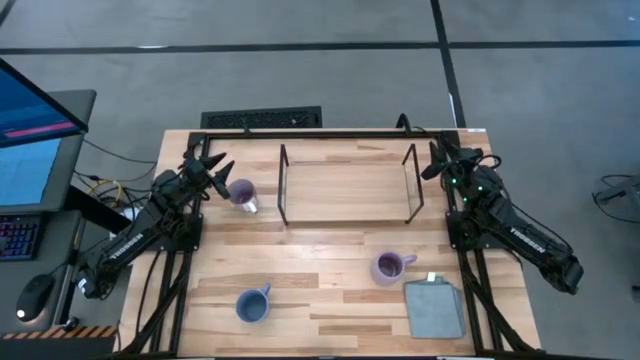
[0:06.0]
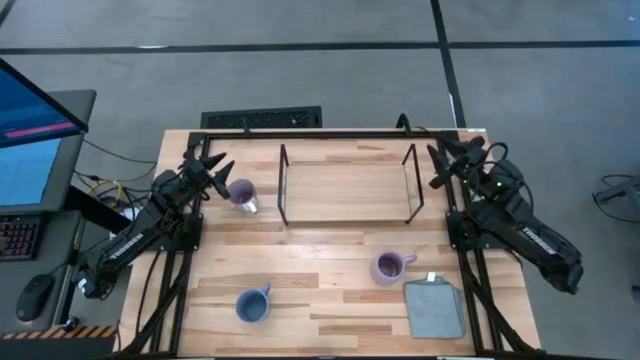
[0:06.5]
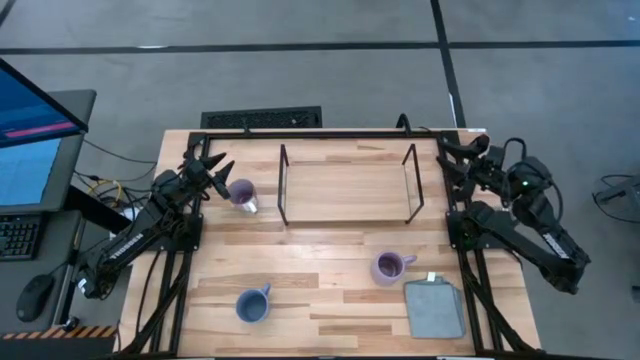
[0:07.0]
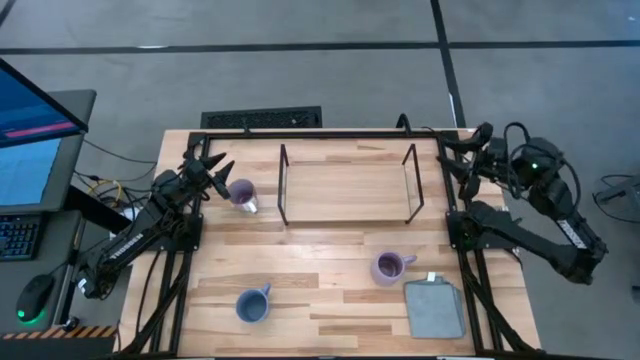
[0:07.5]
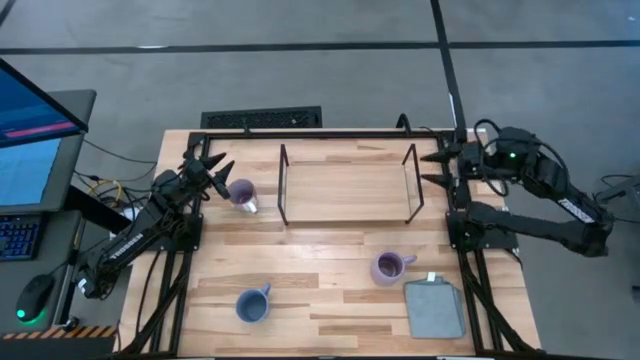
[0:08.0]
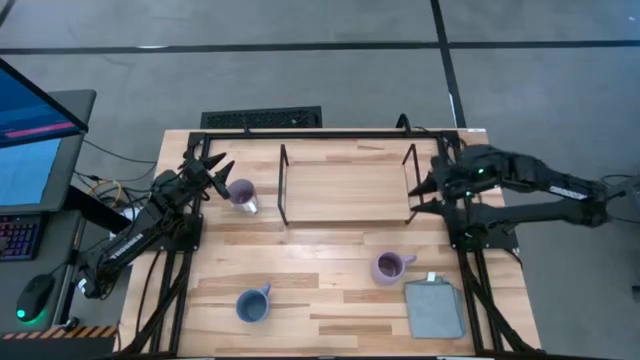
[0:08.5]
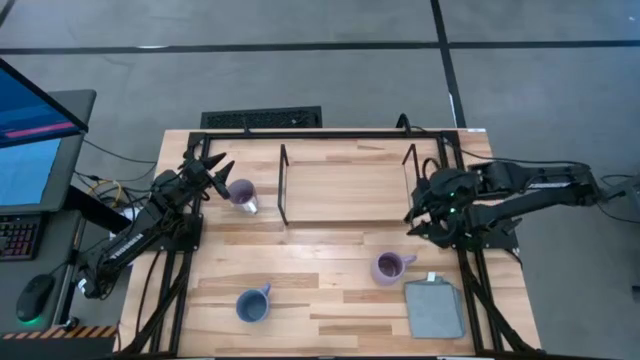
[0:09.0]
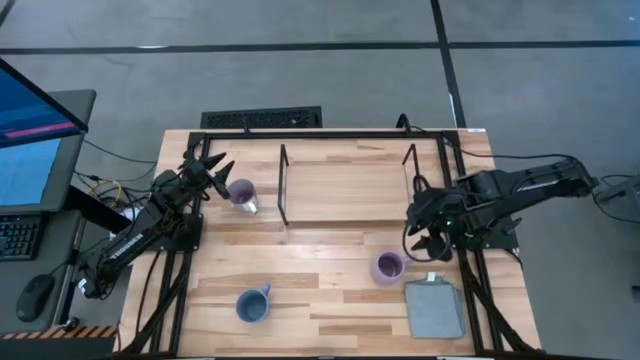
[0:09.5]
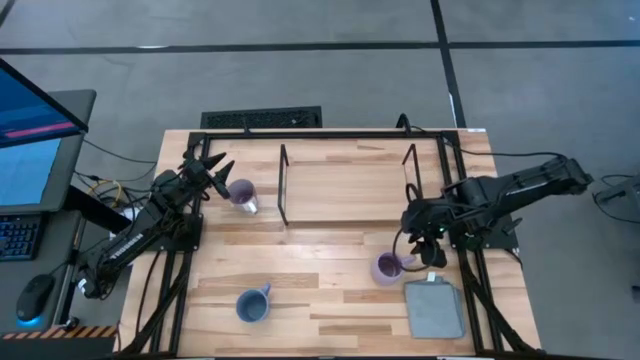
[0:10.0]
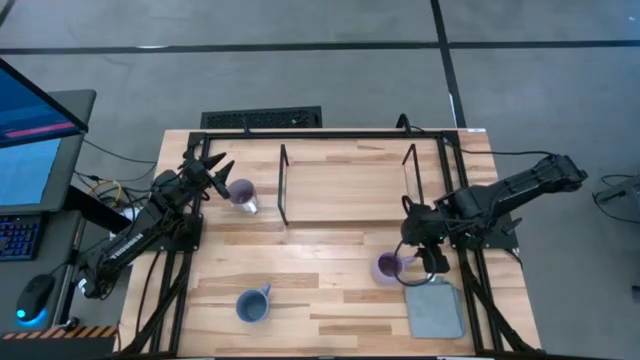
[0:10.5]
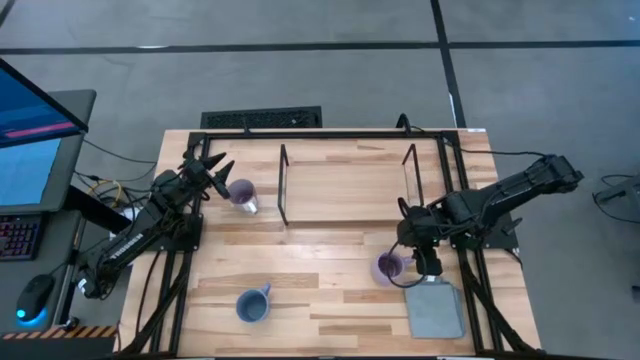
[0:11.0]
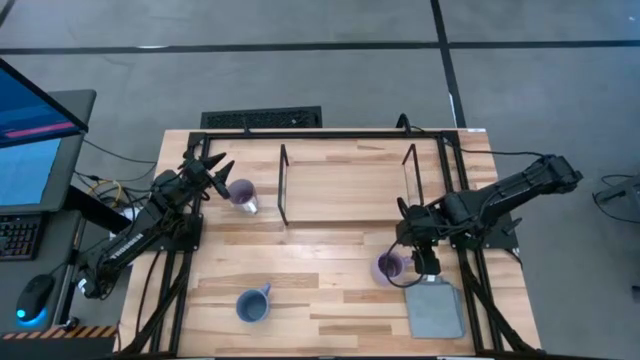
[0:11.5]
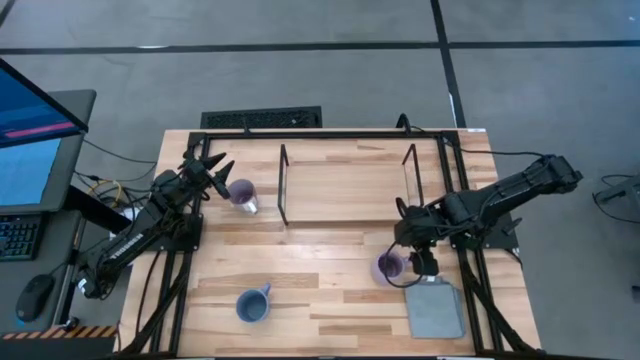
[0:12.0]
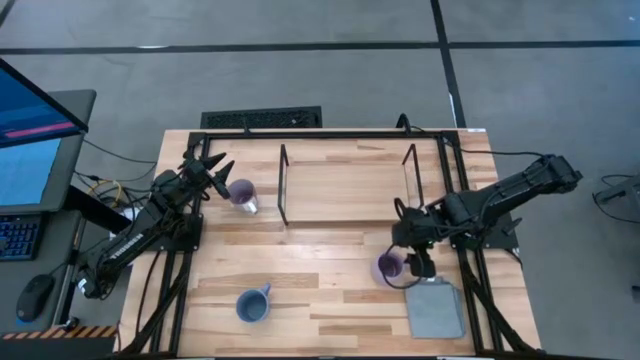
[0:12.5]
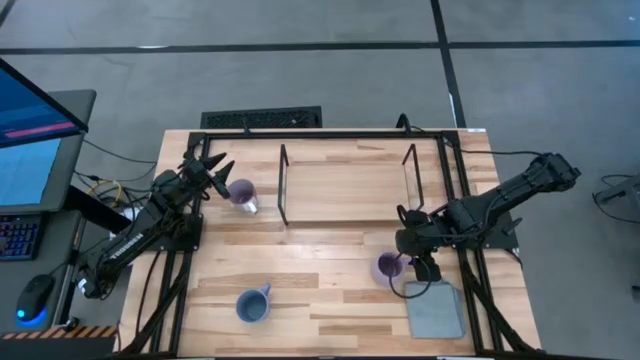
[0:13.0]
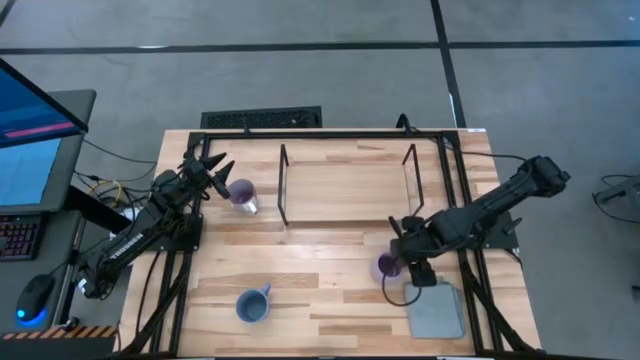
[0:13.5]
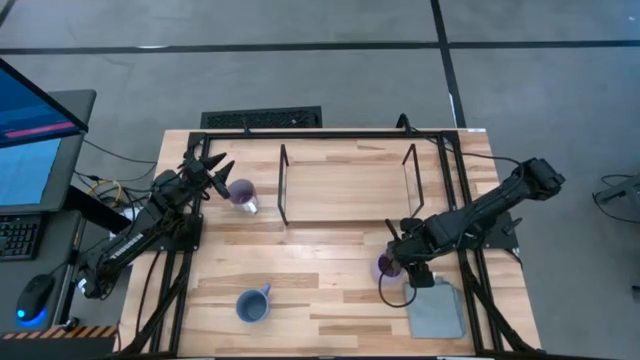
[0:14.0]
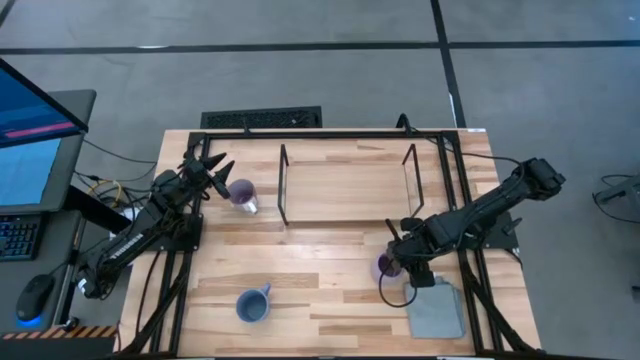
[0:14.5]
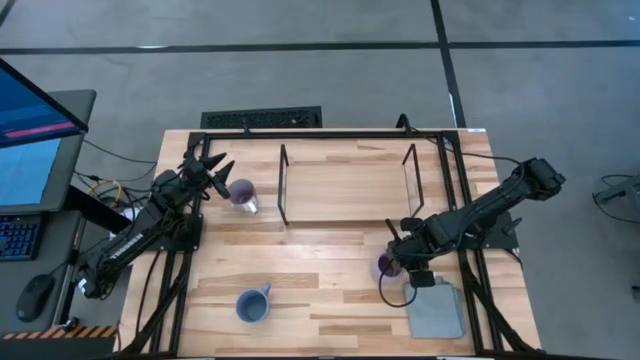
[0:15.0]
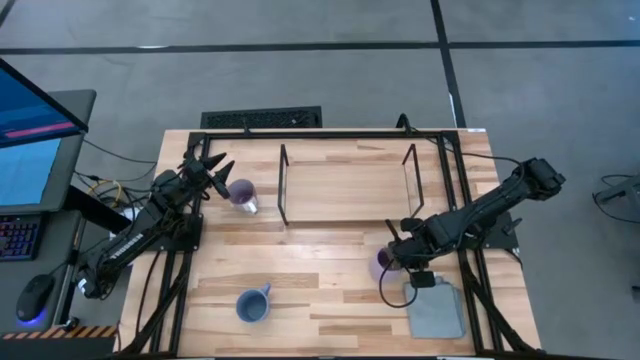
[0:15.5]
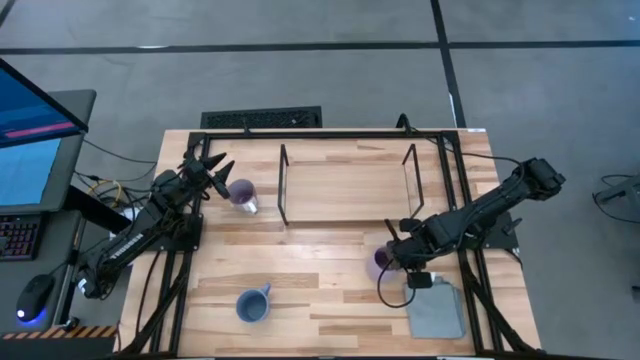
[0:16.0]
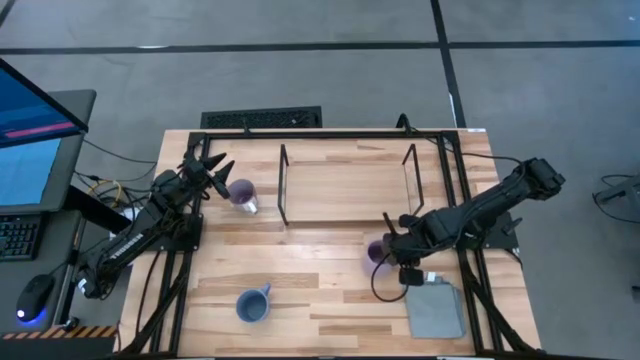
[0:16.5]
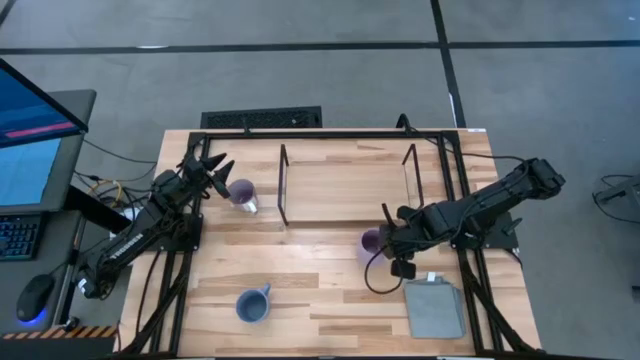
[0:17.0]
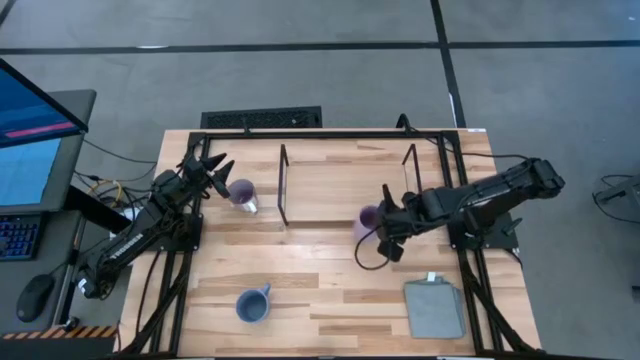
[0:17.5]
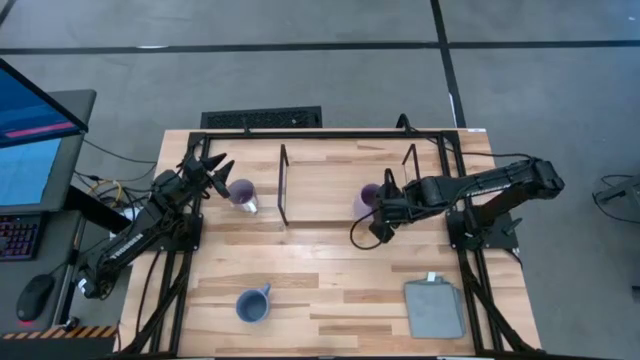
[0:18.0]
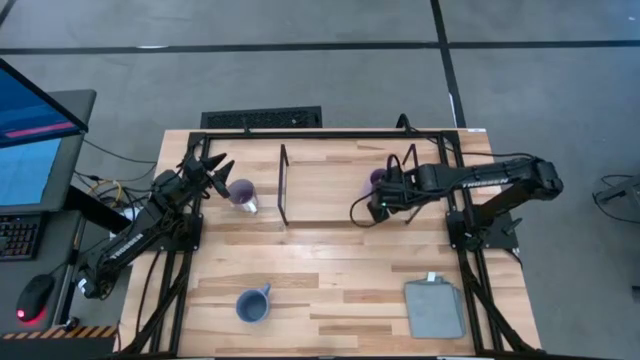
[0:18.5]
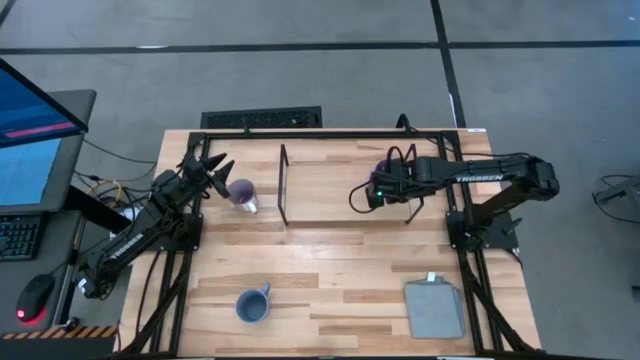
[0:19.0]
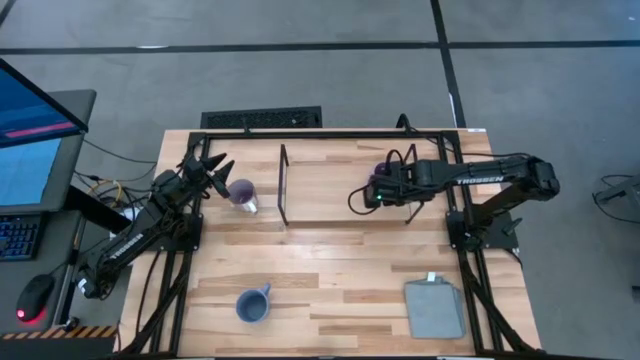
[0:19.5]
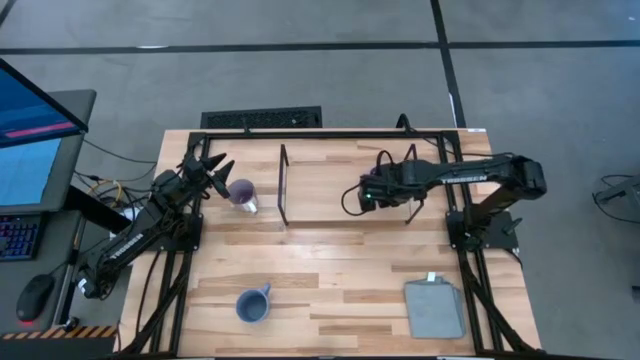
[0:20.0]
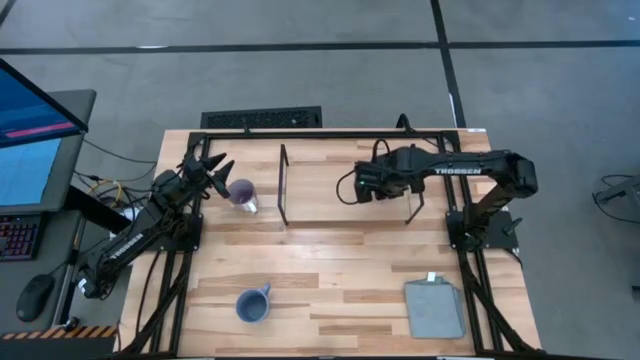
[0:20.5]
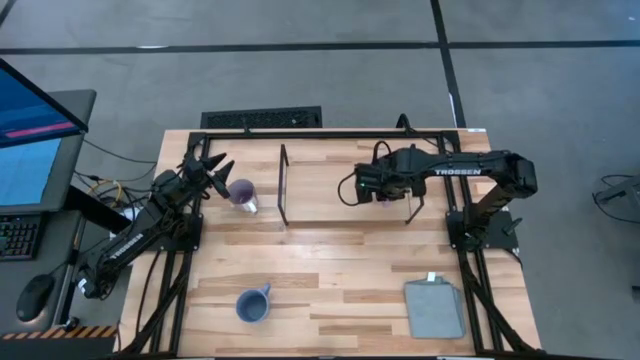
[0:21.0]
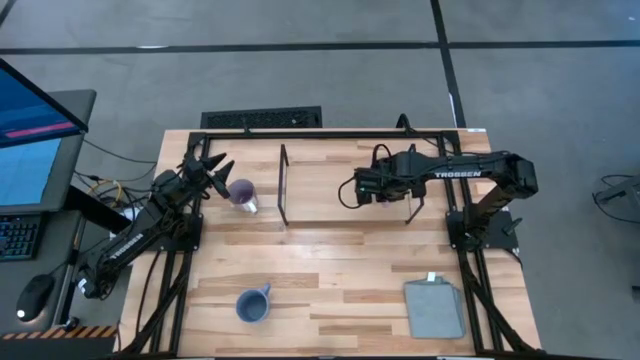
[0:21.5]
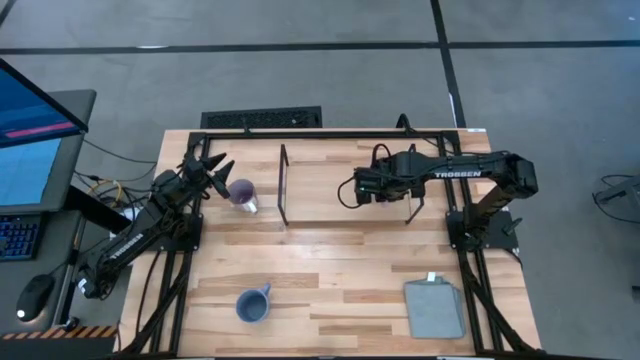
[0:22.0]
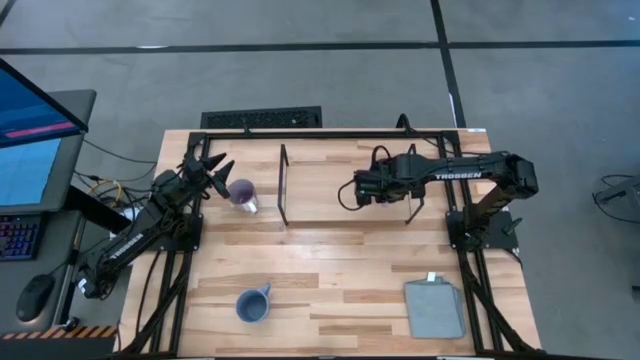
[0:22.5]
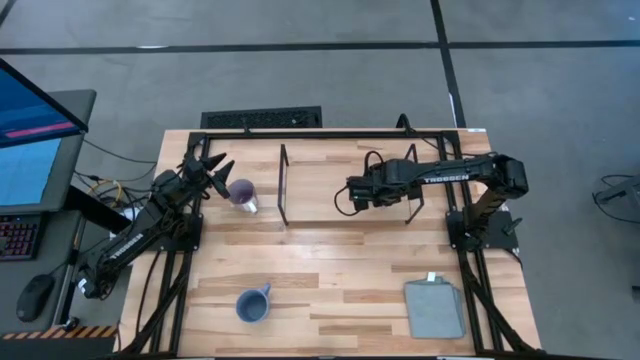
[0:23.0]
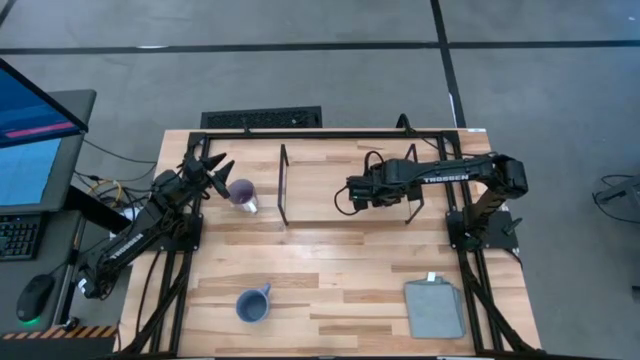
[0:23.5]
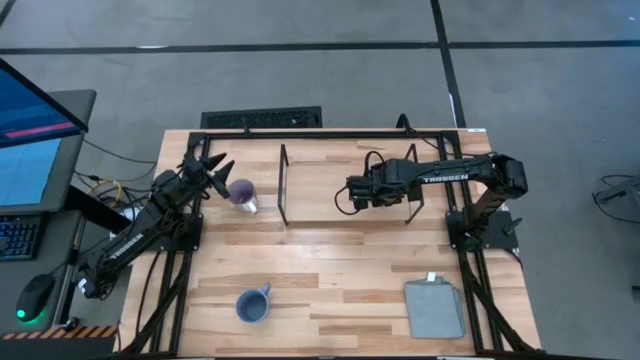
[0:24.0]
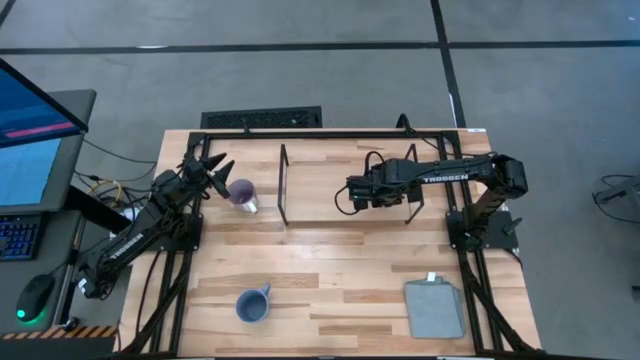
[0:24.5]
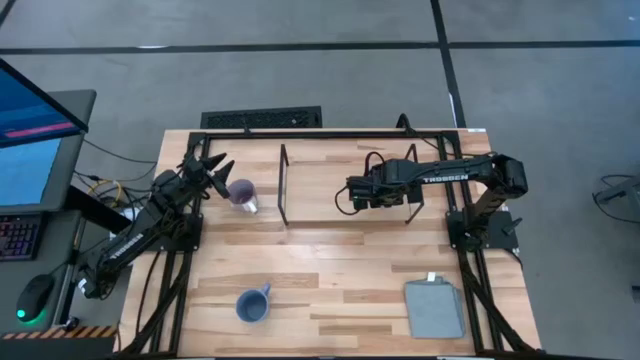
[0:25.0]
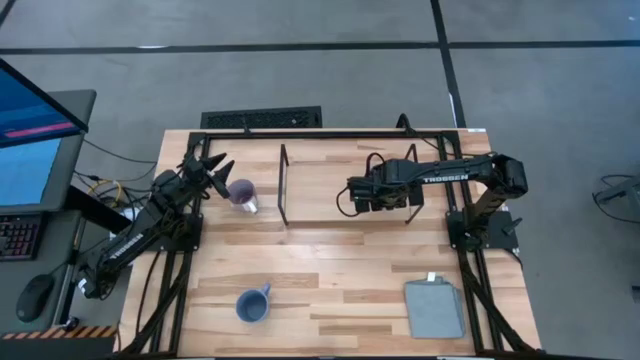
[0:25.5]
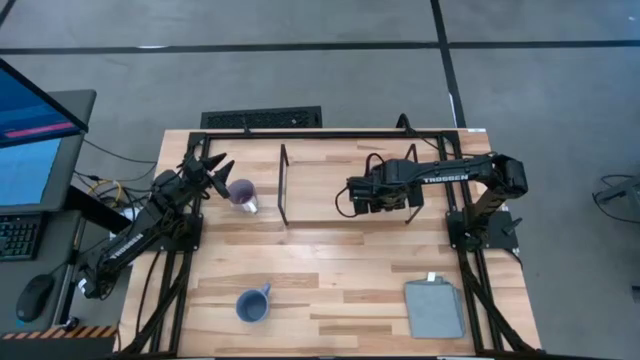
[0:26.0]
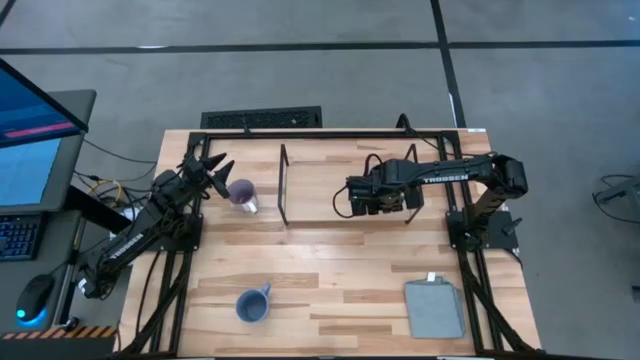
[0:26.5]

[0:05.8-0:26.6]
Task: Stack small to large cups/mugs on shelf
Put the violet mug on the shelf
